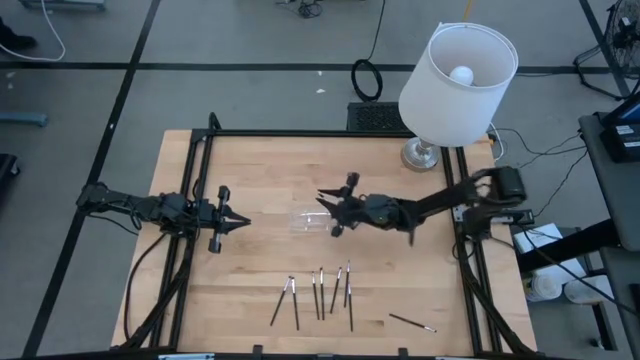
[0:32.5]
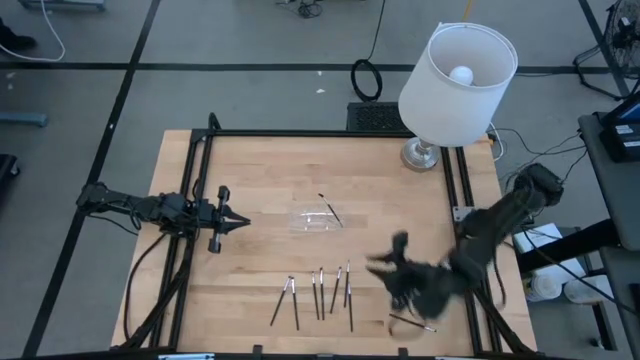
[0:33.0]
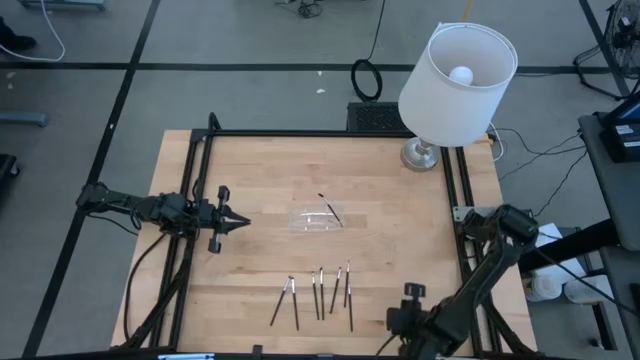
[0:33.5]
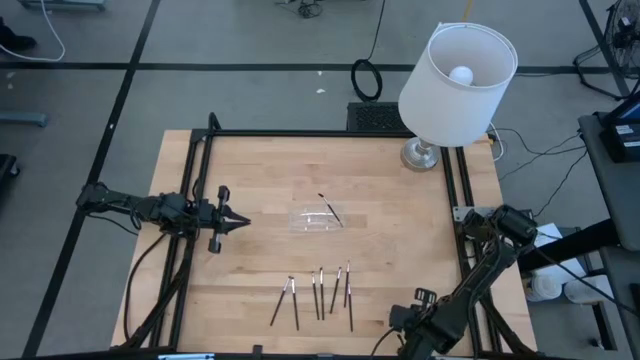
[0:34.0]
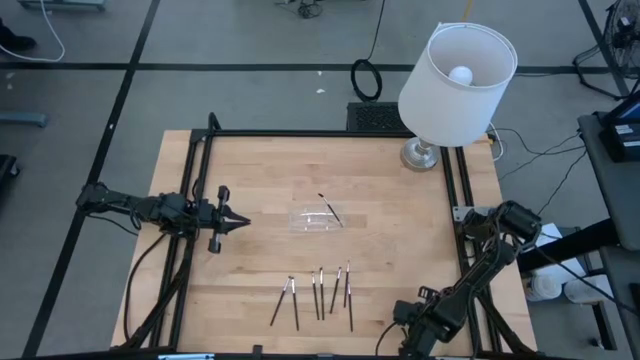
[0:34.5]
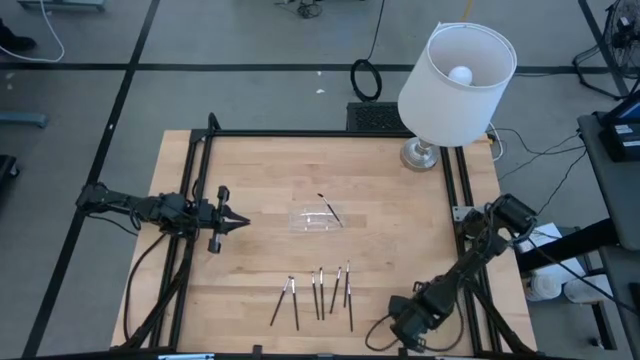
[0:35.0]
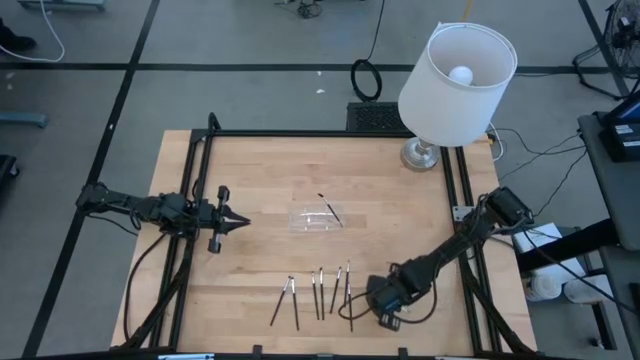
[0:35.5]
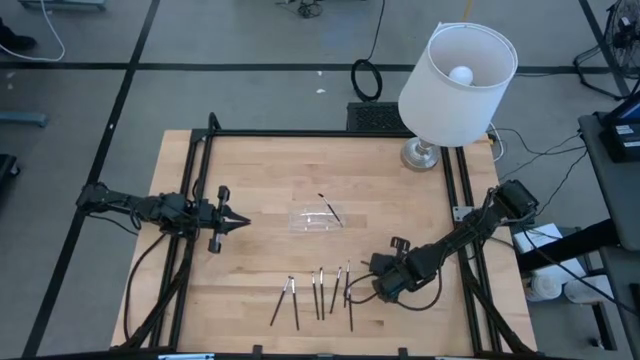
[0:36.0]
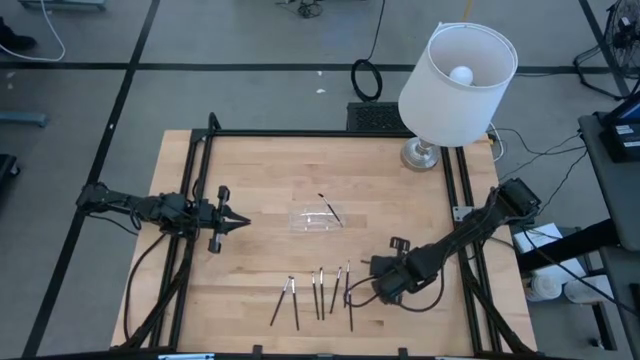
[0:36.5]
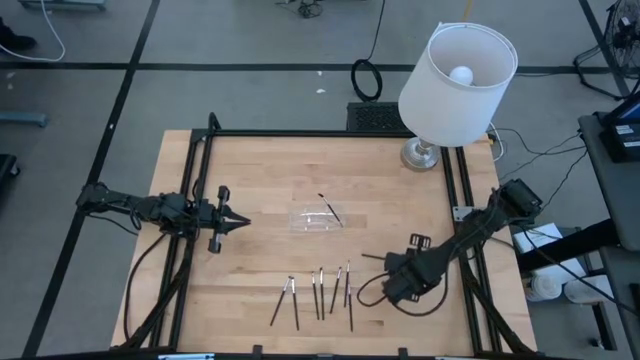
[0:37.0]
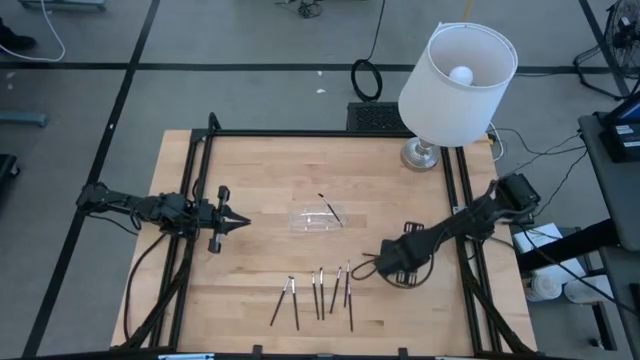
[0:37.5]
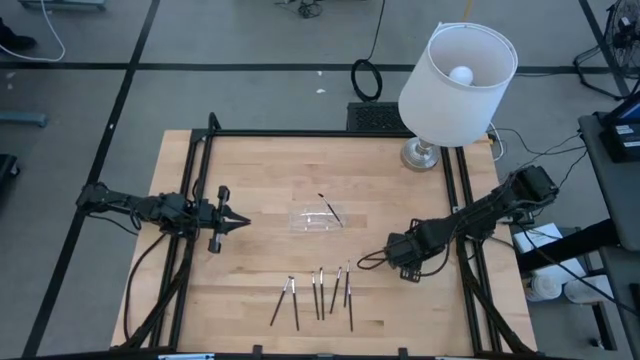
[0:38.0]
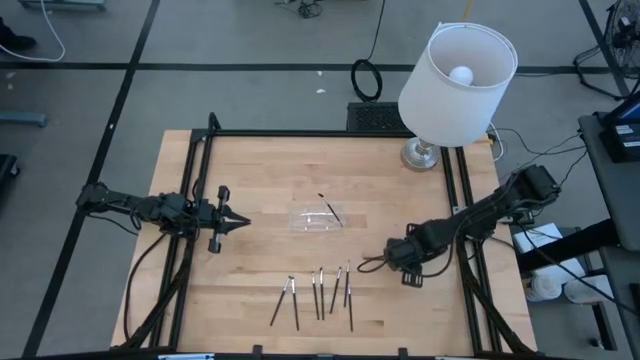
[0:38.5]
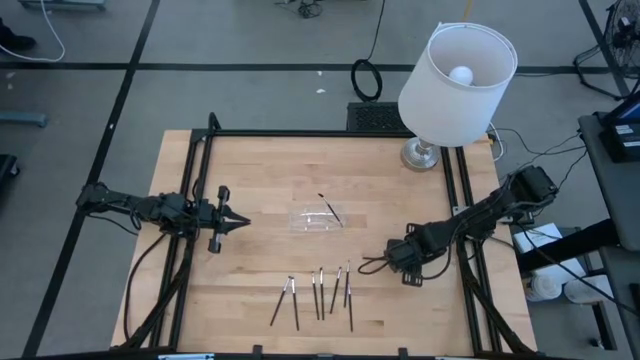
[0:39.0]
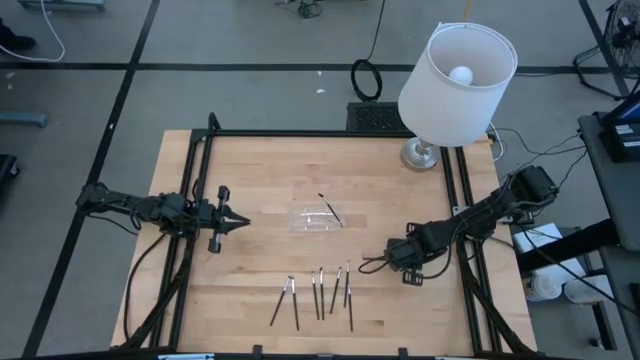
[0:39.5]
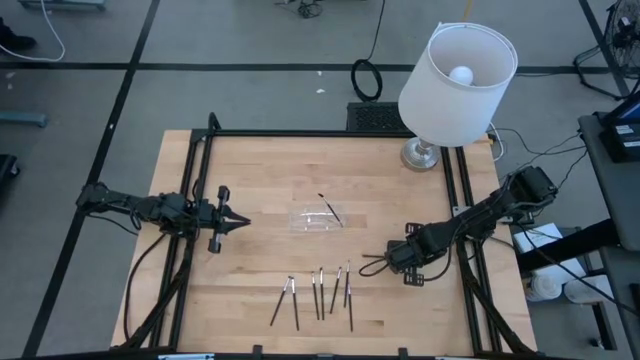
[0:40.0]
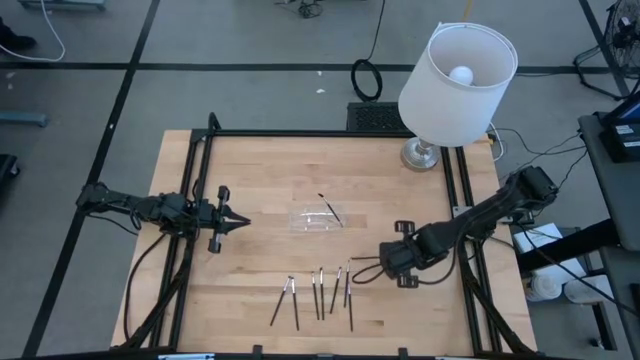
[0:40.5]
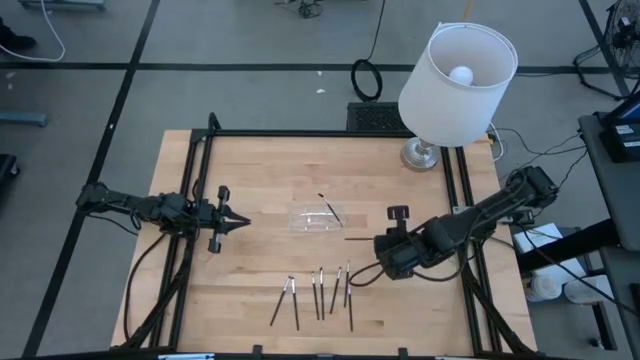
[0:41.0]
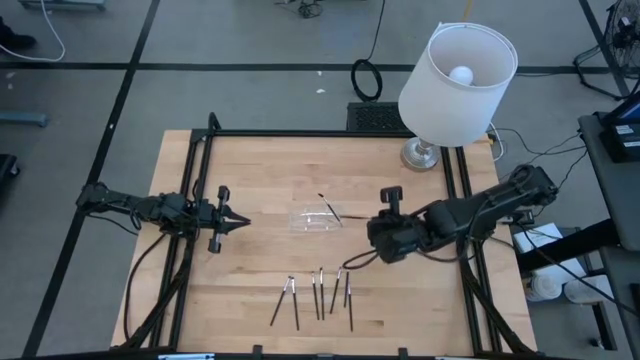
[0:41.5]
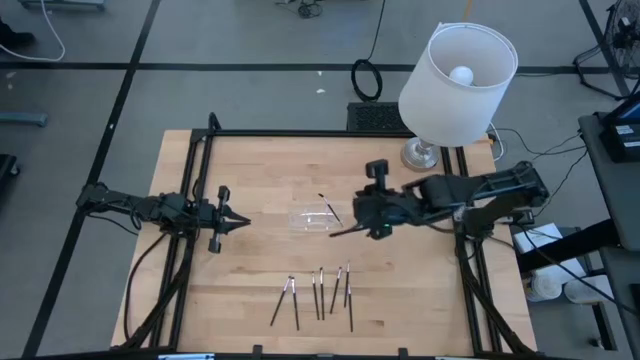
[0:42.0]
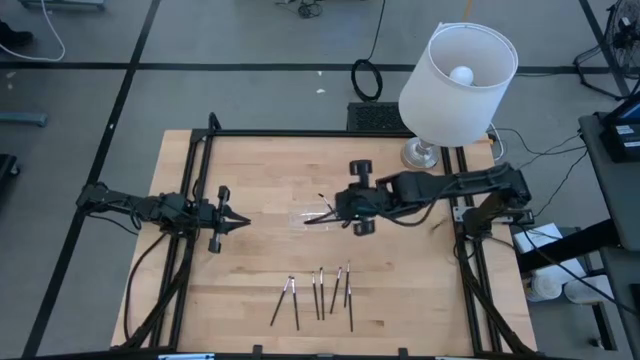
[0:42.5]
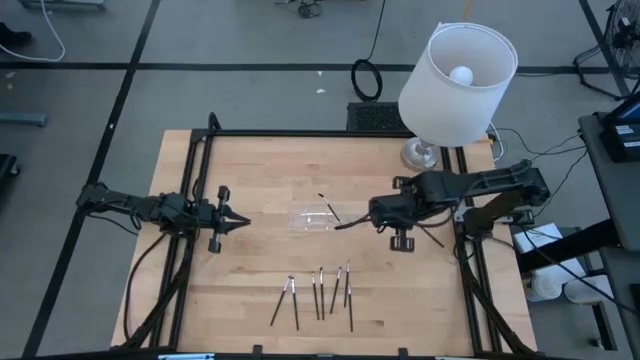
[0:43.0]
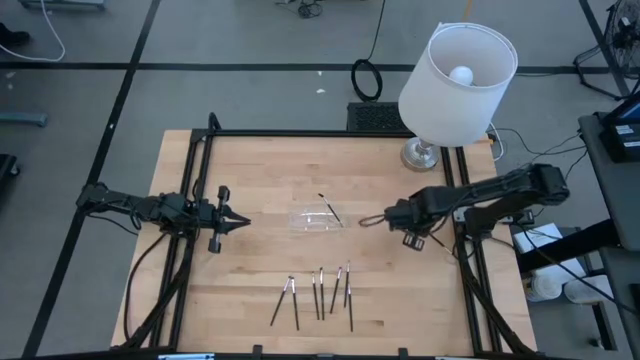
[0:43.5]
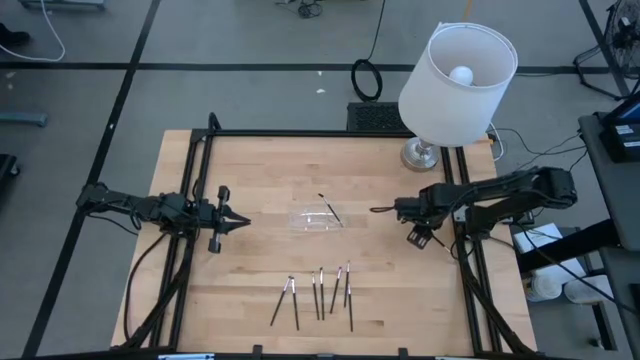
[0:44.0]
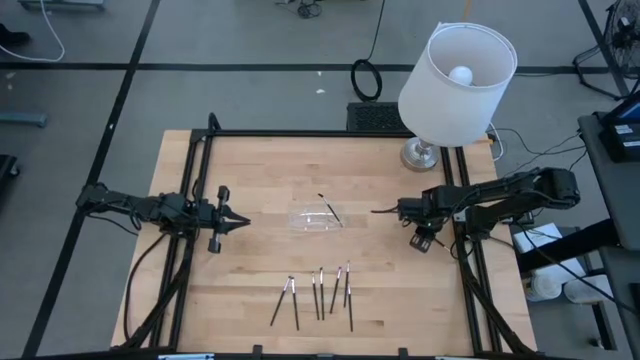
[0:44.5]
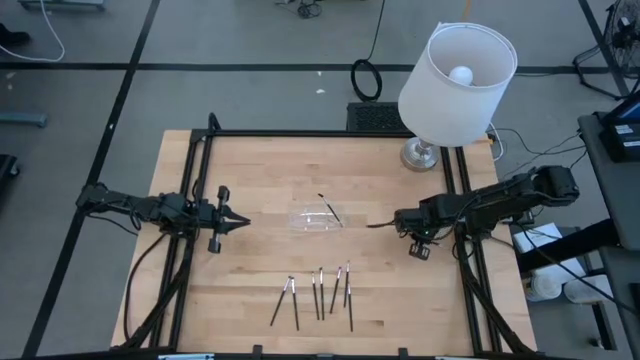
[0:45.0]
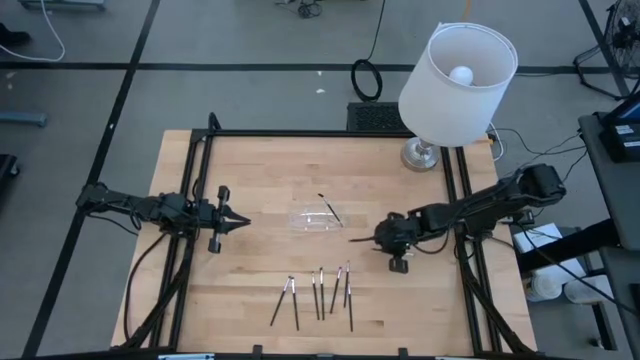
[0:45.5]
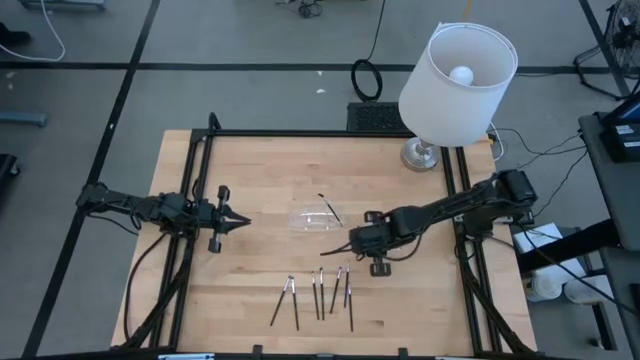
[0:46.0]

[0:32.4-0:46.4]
Task: Pick & Place Makeup Supplies
Put the makeup brush into the transparent organizer

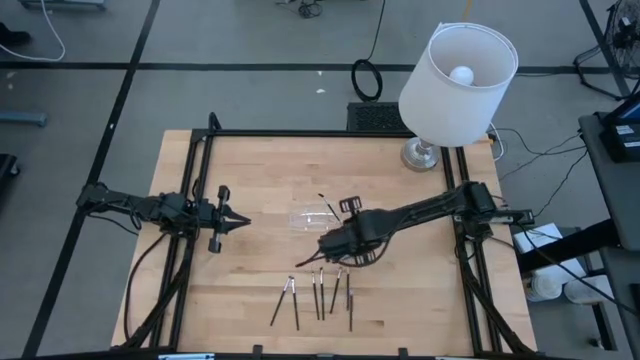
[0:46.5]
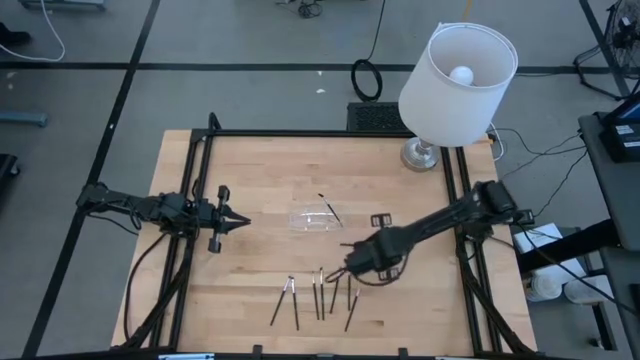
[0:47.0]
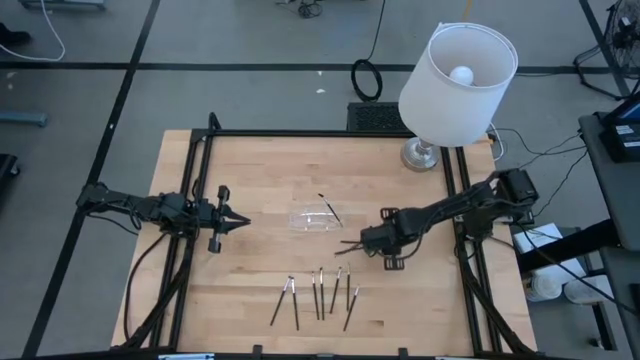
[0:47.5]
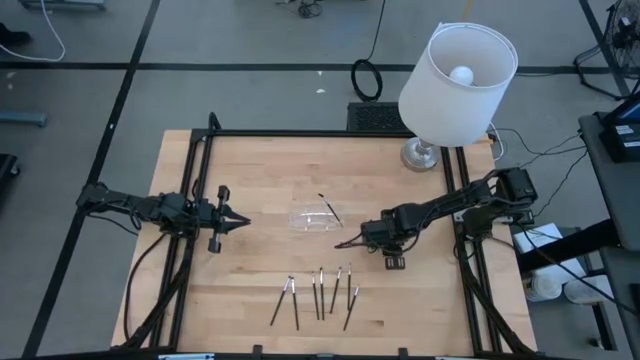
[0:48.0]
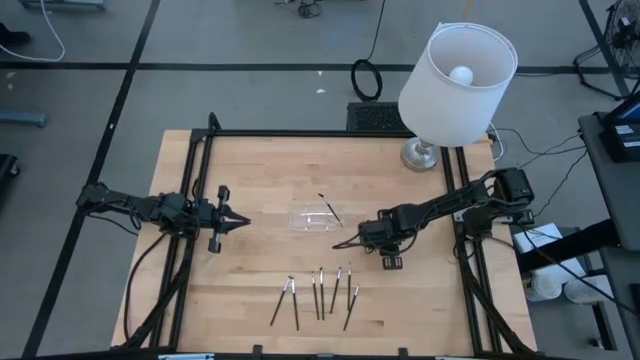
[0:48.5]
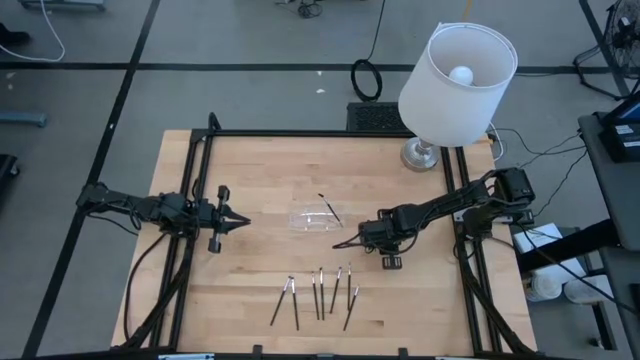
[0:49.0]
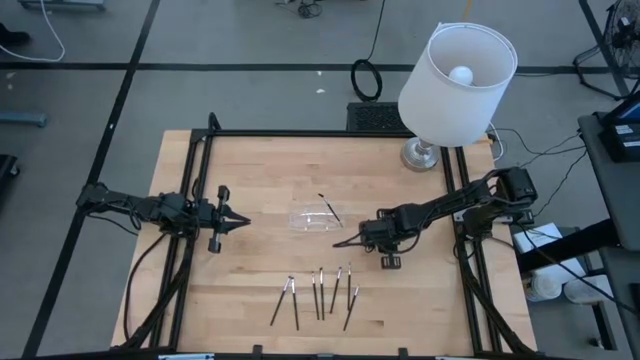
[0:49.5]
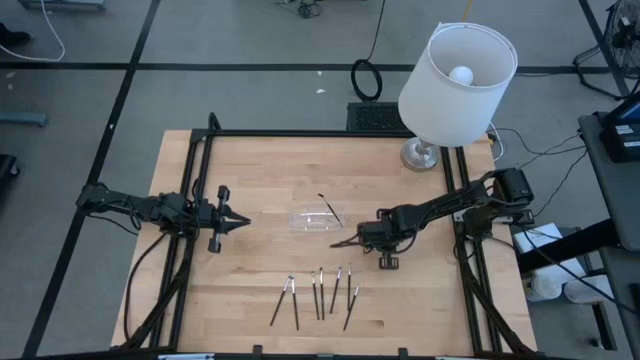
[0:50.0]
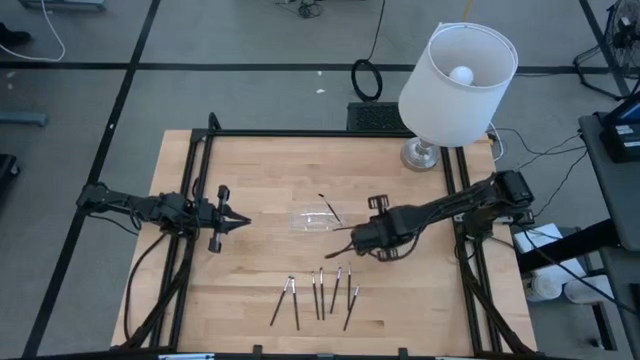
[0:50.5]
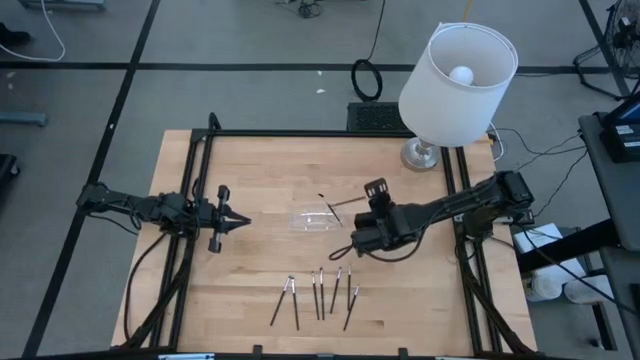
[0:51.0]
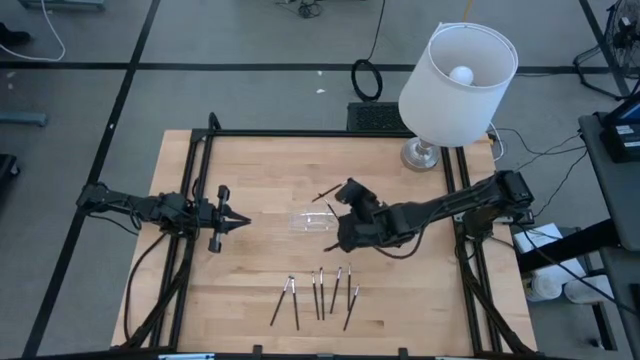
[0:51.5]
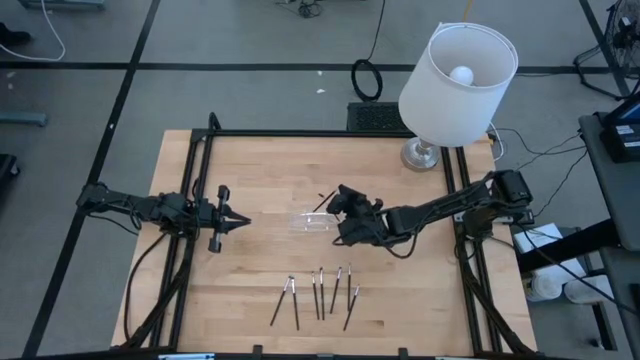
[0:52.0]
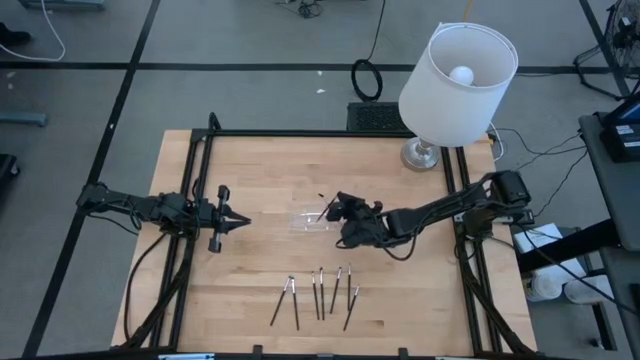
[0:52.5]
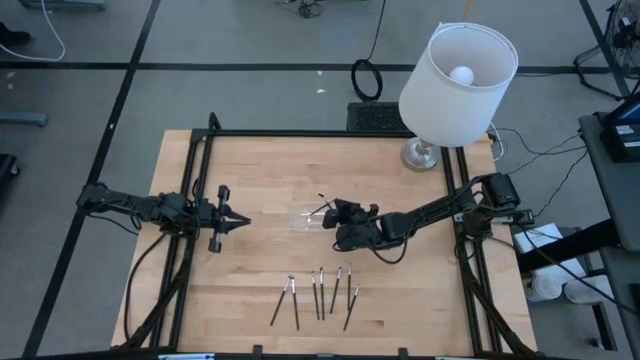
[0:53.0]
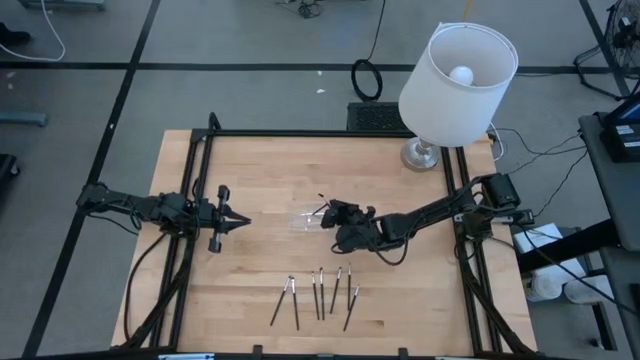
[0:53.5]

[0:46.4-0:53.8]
Put the makeup brush into the transparent organizer
